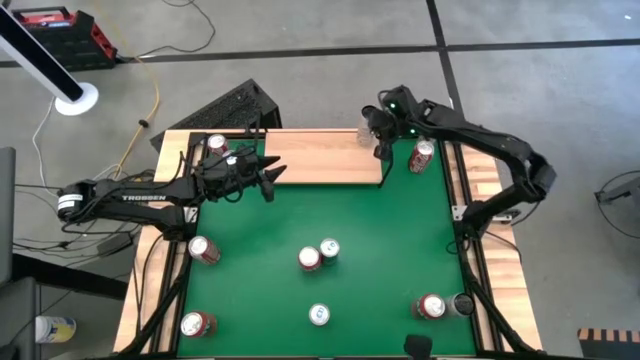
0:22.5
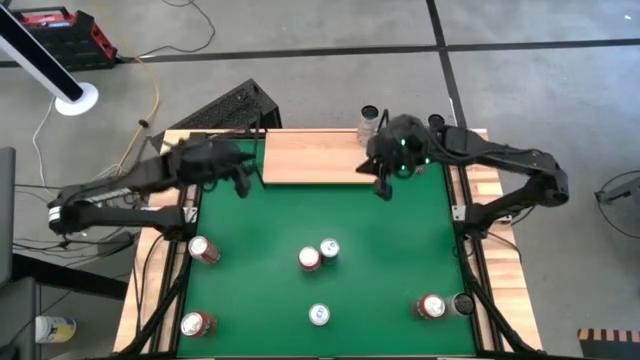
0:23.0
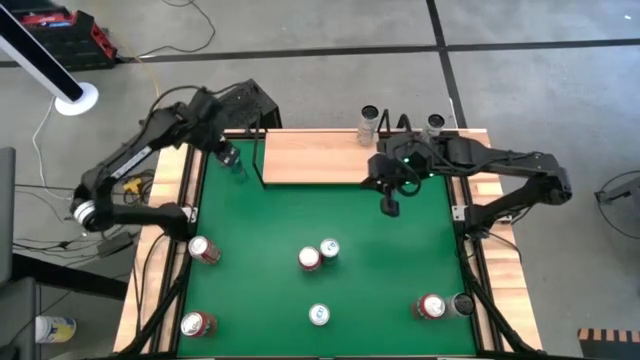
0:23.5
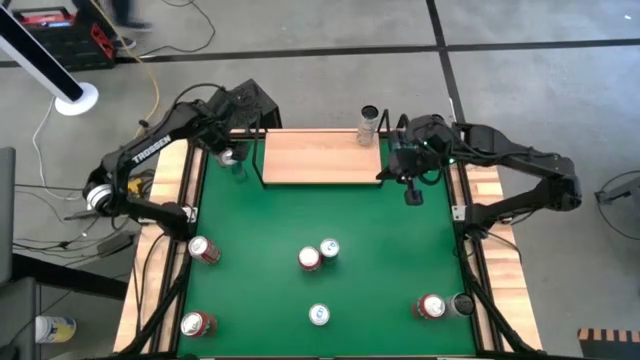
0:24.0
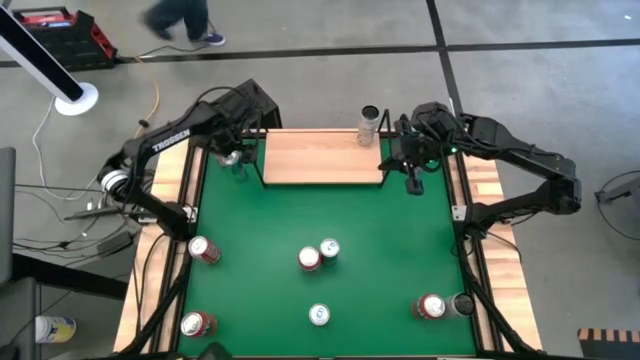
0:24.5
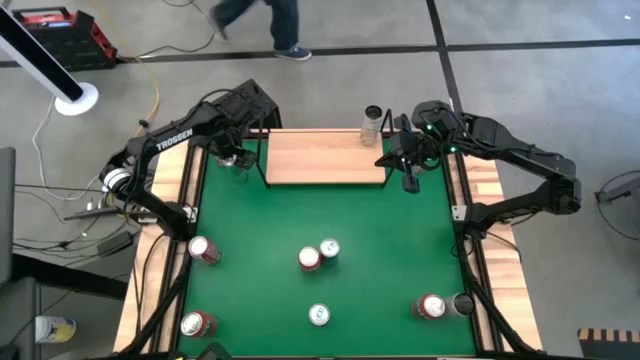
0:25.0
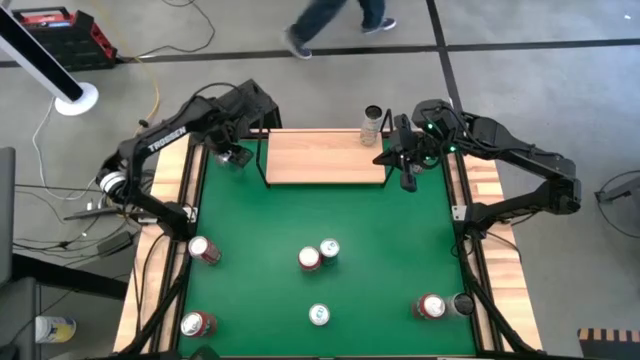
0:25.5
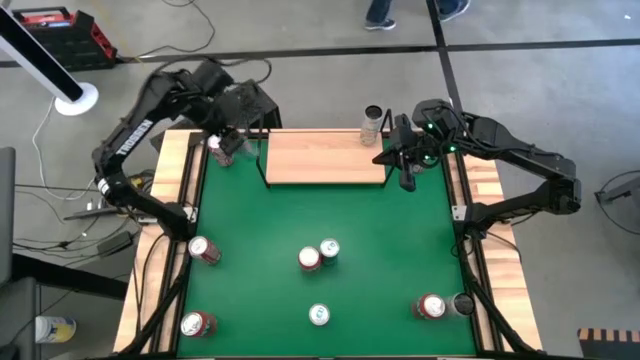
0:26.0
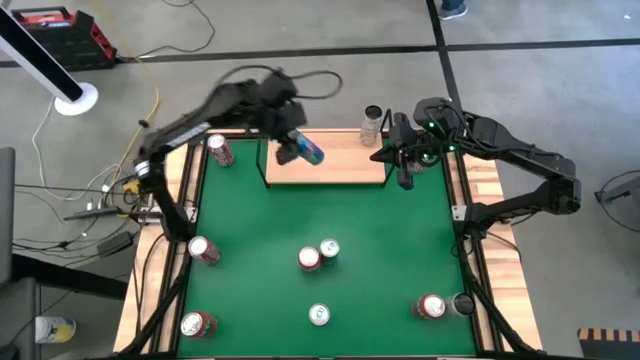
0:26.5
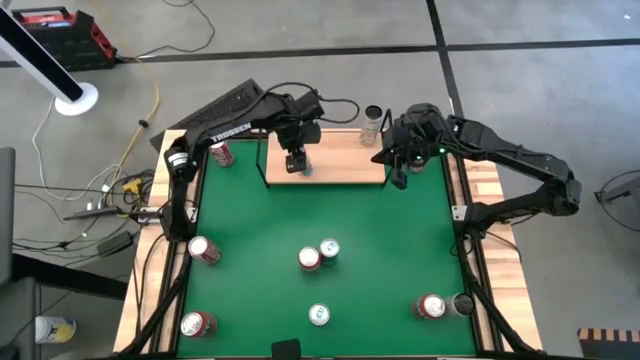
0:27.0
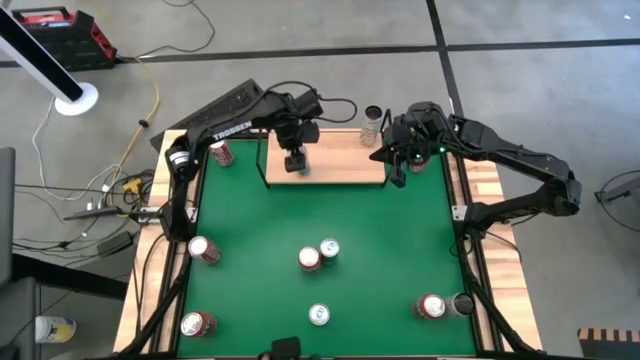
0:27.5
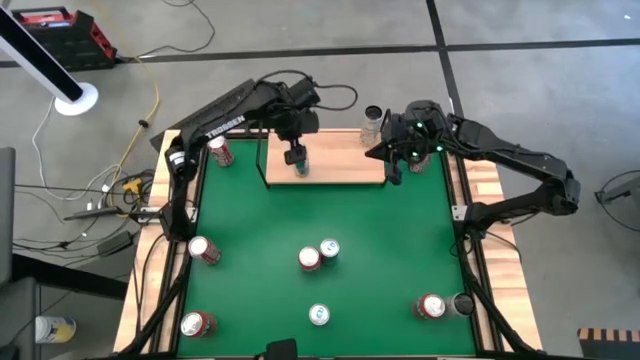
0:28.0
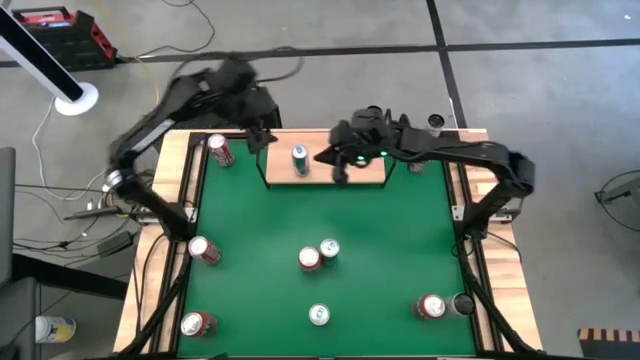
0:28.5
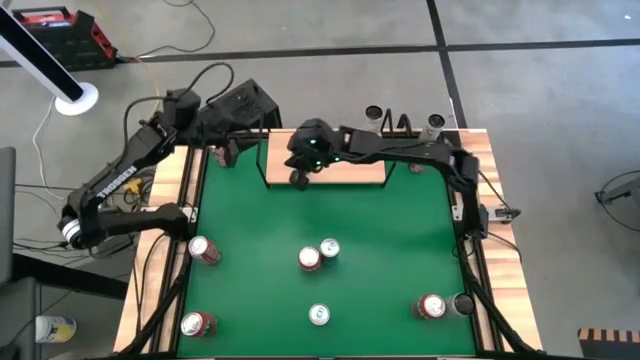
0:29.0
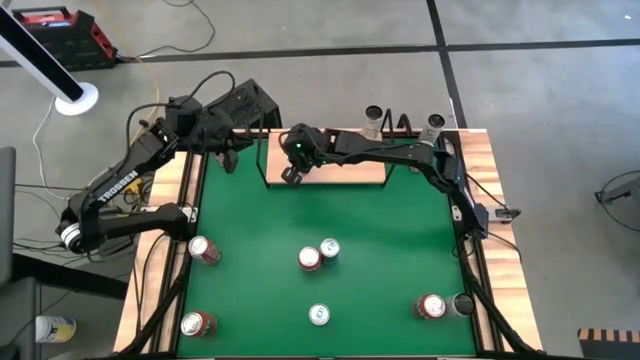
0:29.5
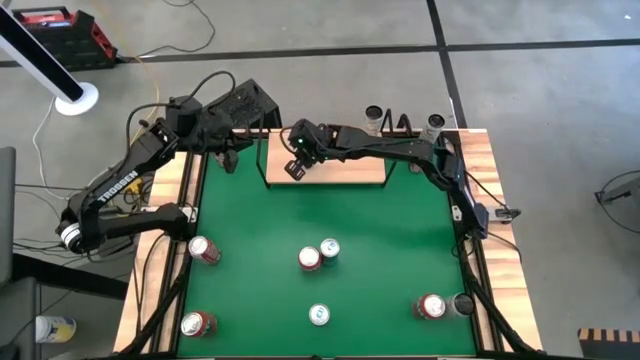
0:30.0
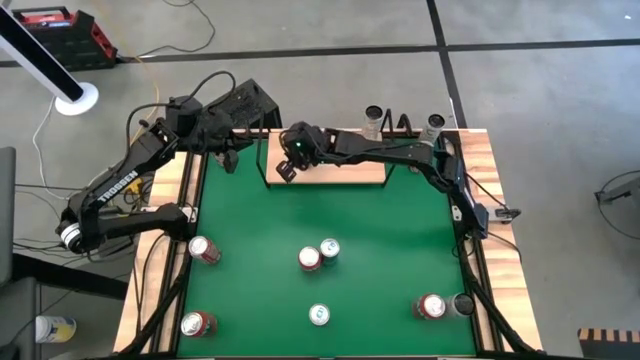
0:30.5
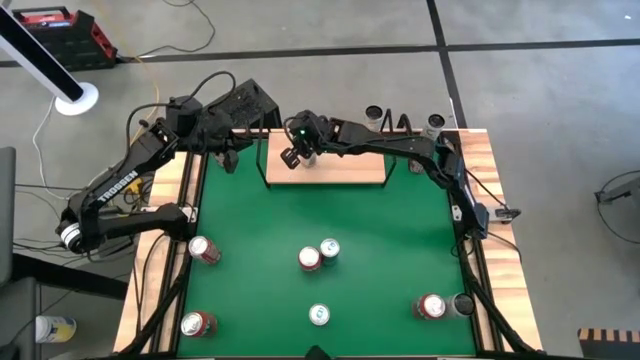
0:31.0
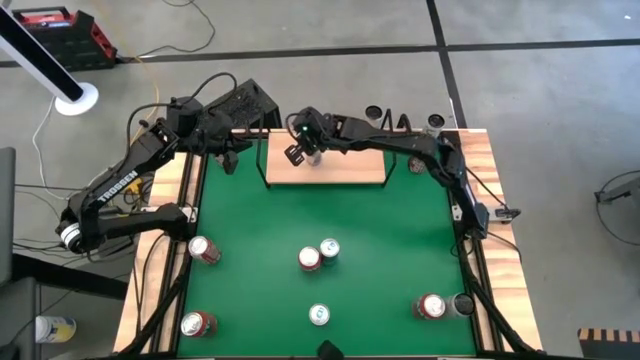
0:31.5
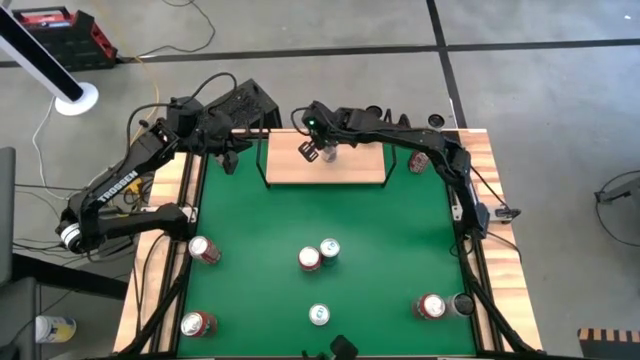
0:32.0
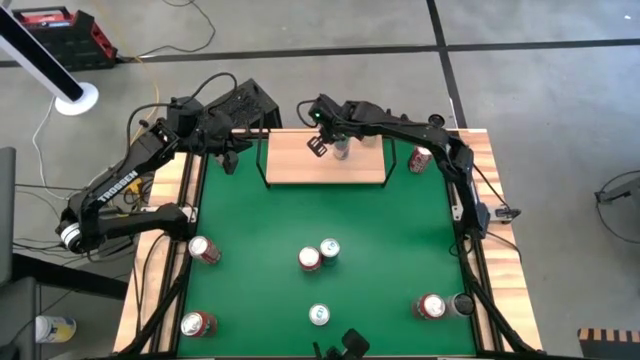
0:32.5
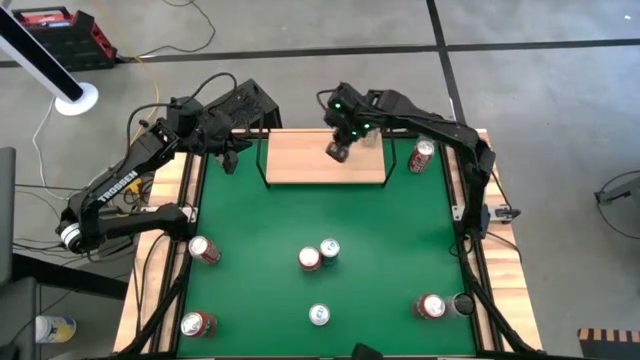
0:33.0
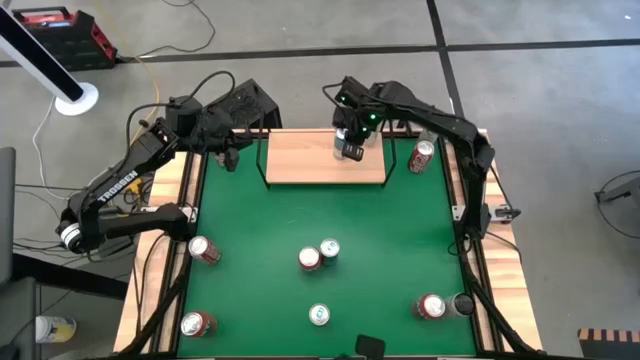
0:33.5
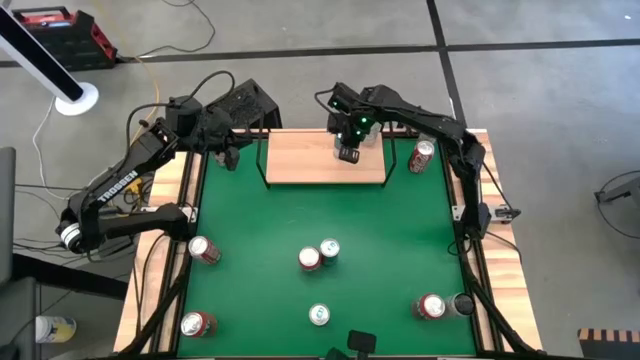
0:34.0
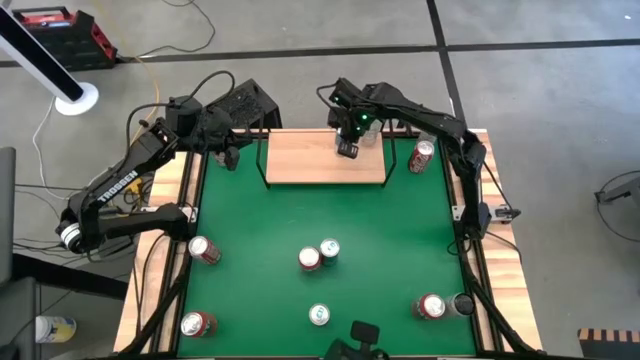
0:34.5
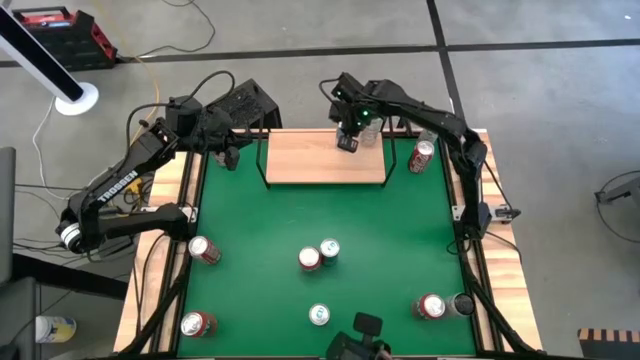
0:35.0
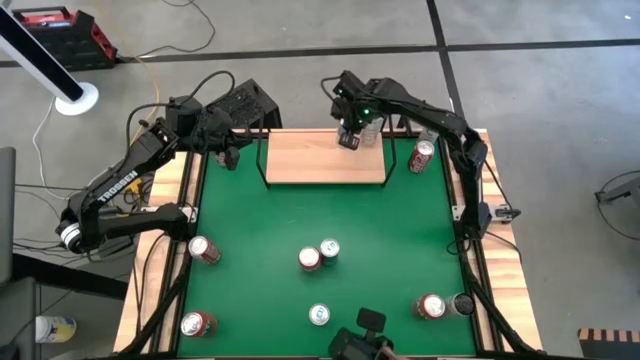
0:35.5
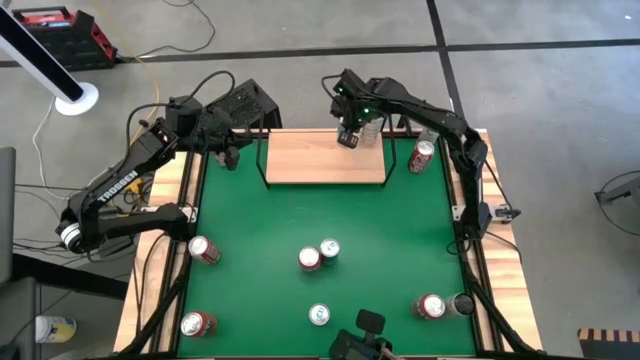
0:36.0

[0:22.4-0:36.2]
Task: Place canned beverage on shelf
Put the top blue soda can on the shelf

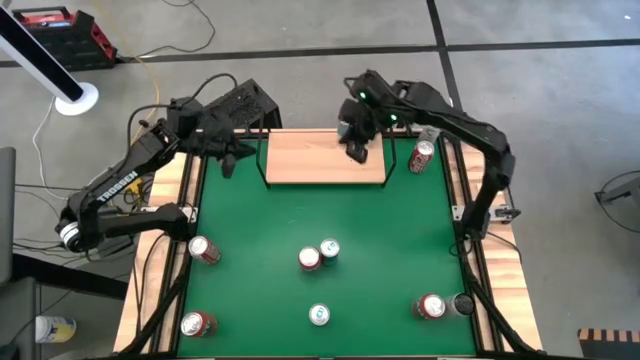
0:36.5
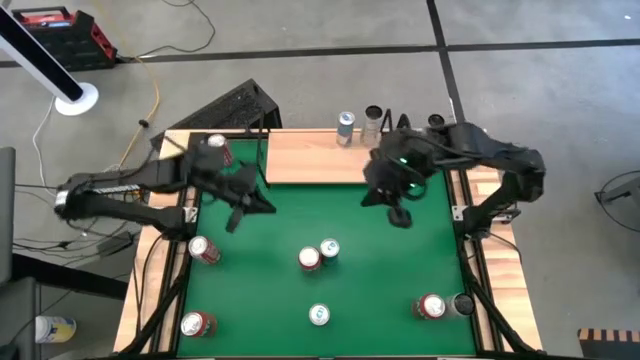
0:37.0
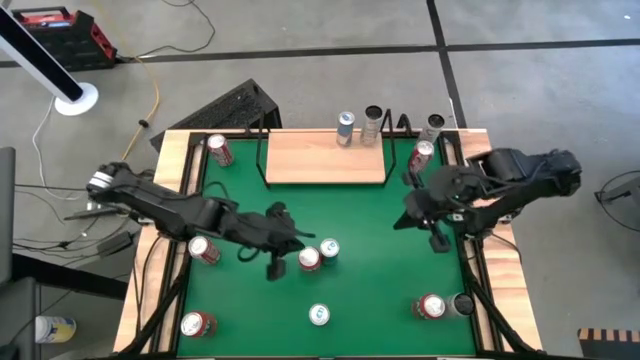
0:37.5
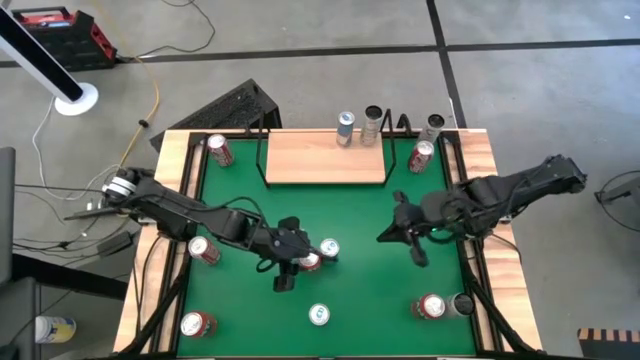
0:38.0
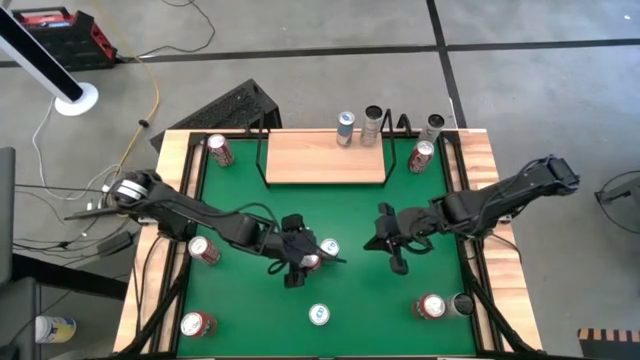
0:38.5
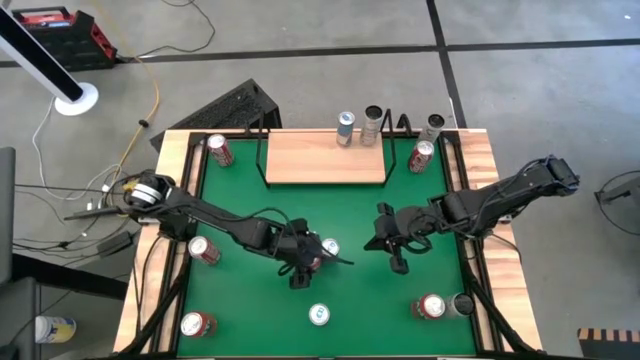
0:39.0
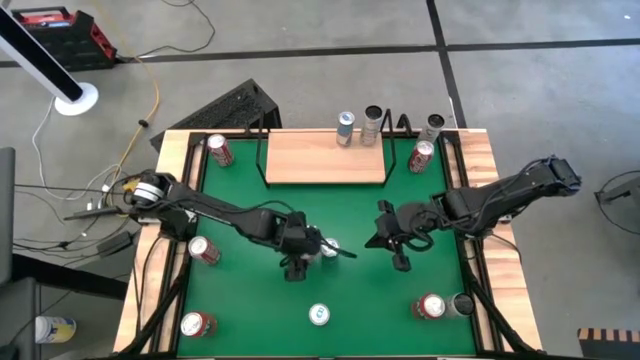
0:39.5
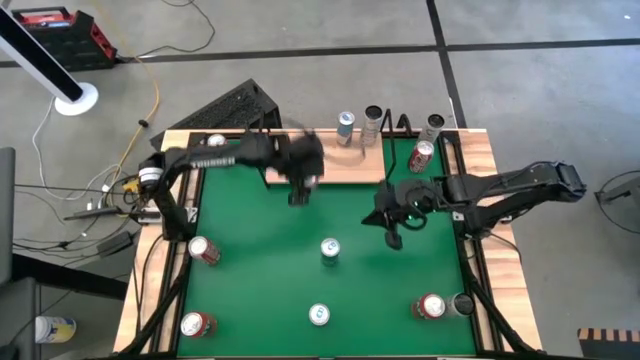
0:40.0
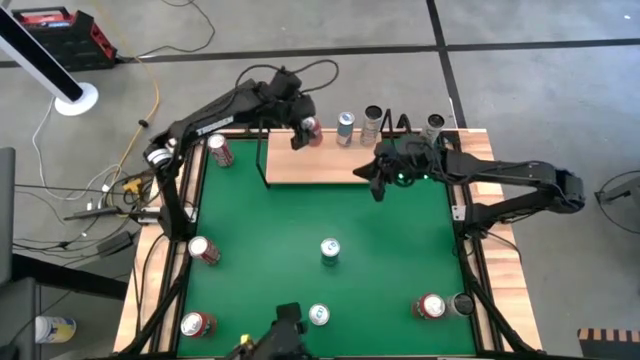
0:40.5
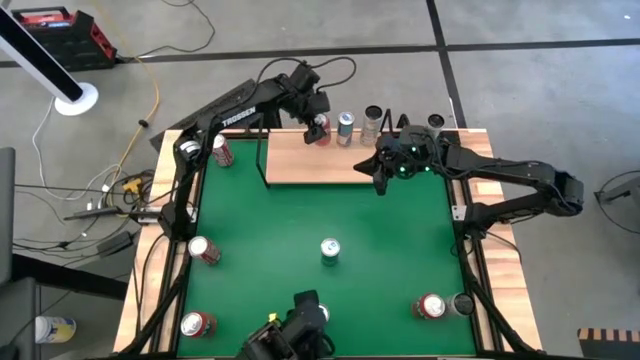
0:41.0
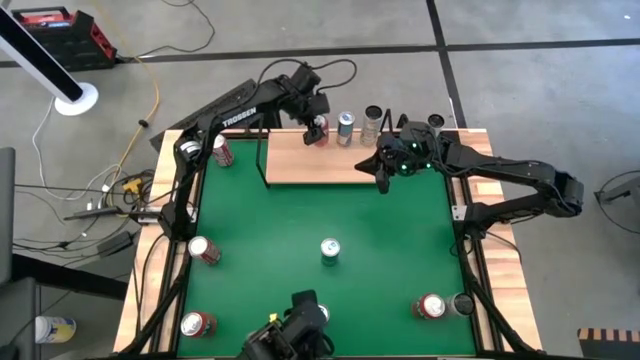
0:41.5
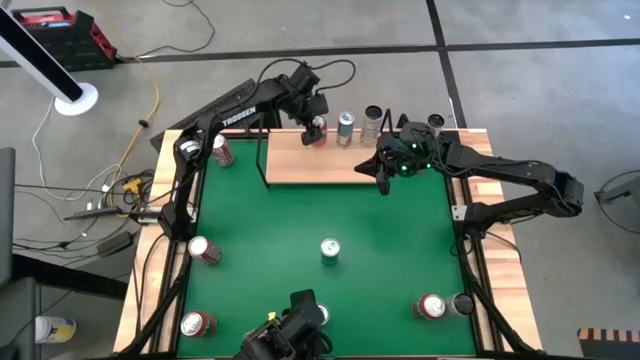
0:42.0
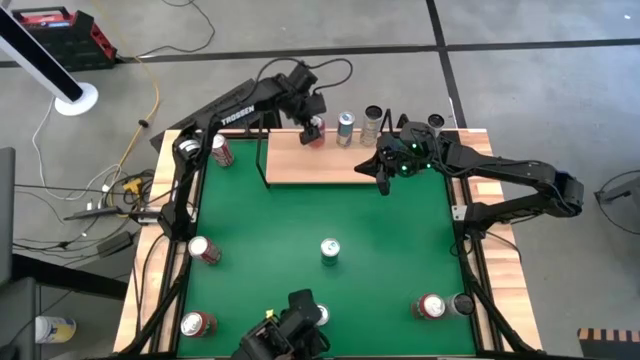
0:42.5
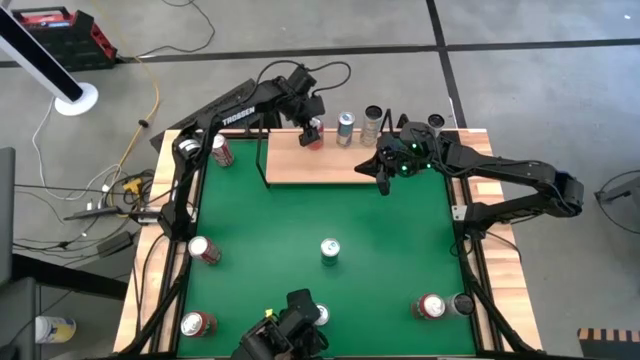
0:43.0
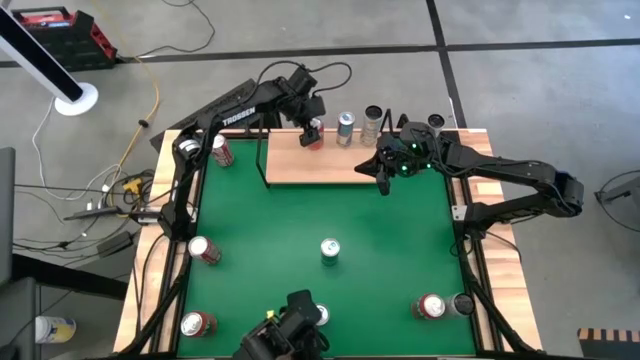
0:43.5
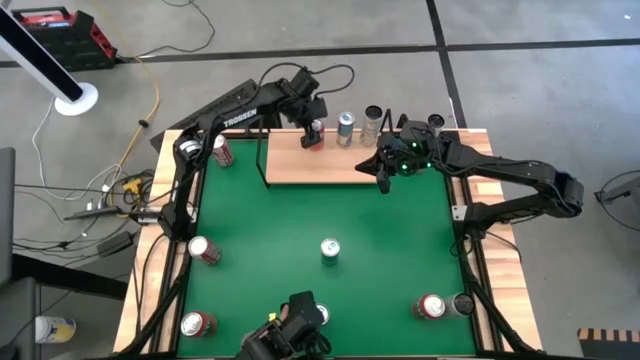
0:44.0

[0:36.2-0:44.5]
Put the top orange soda can on the shelf
